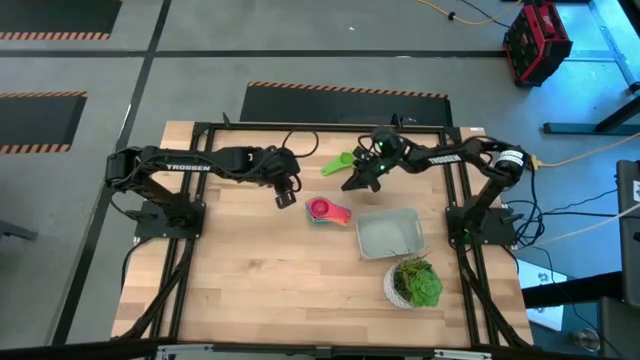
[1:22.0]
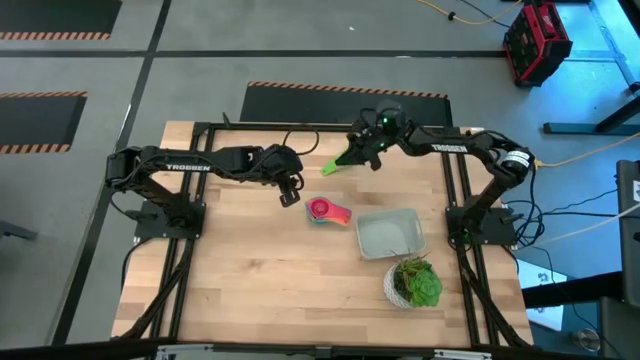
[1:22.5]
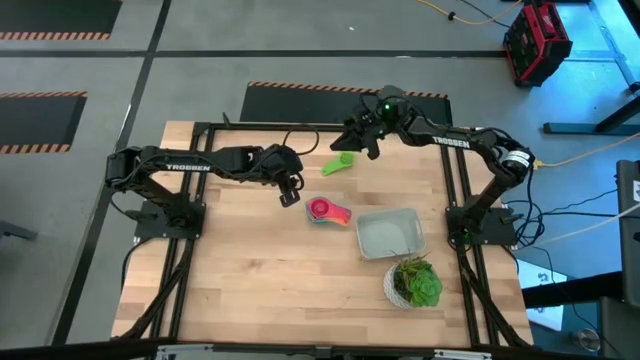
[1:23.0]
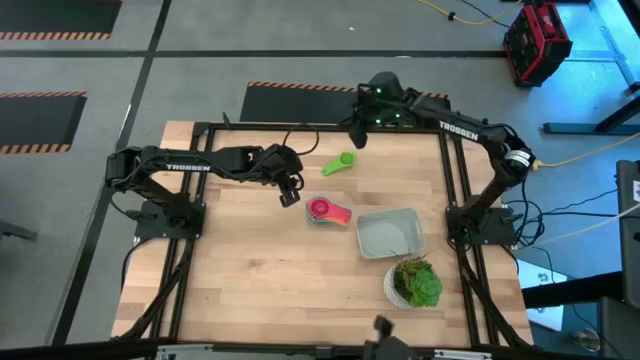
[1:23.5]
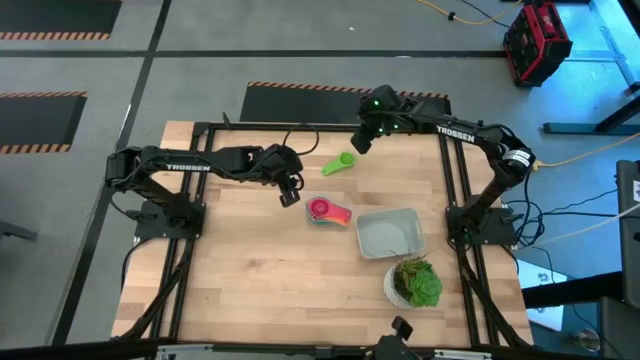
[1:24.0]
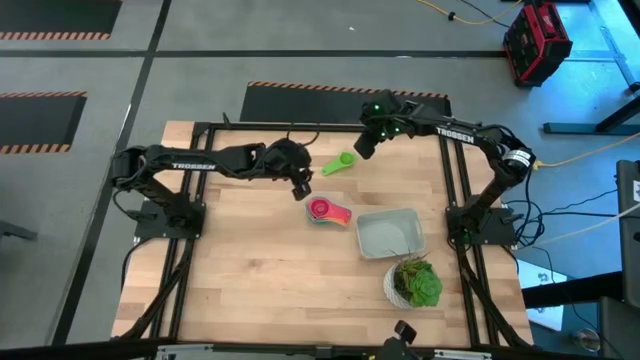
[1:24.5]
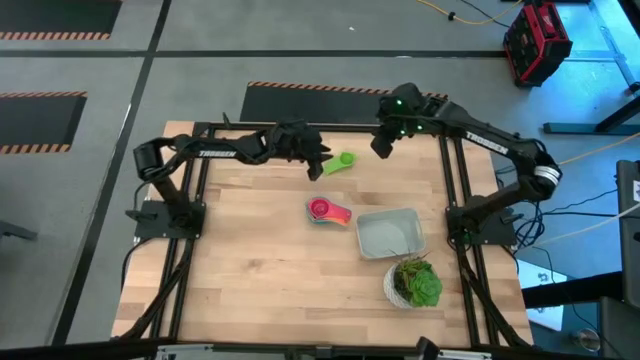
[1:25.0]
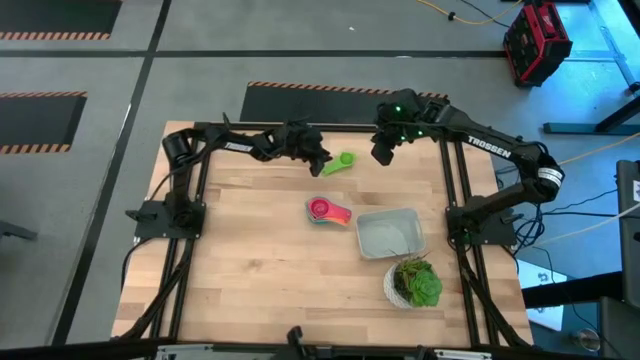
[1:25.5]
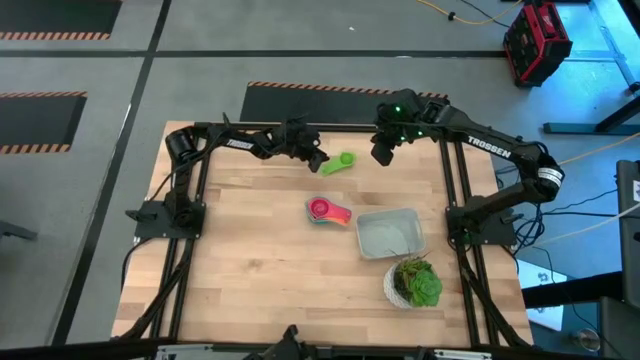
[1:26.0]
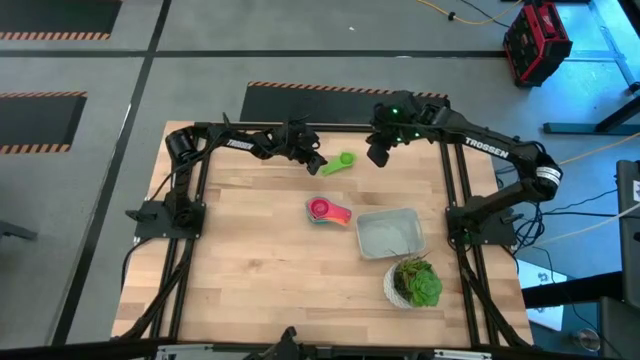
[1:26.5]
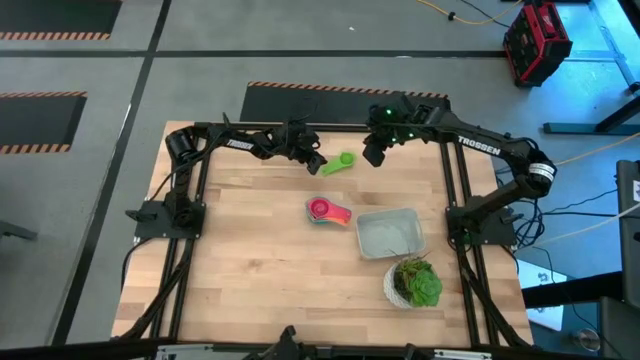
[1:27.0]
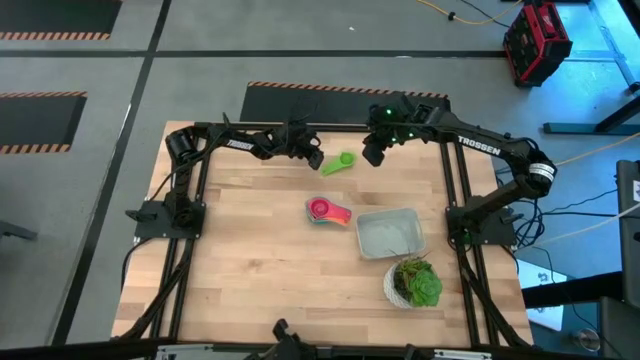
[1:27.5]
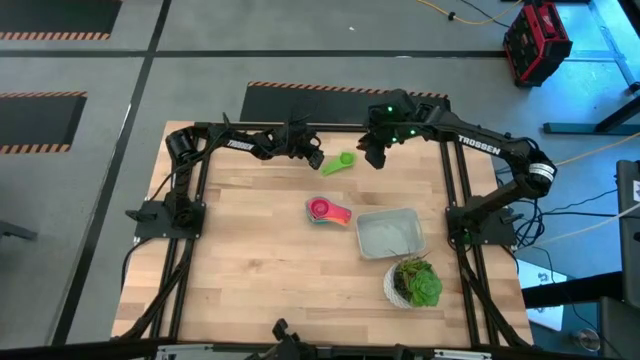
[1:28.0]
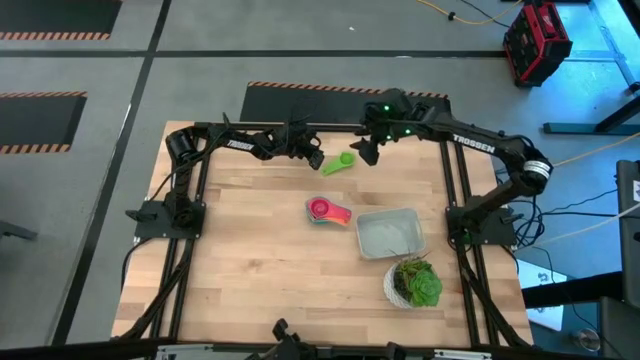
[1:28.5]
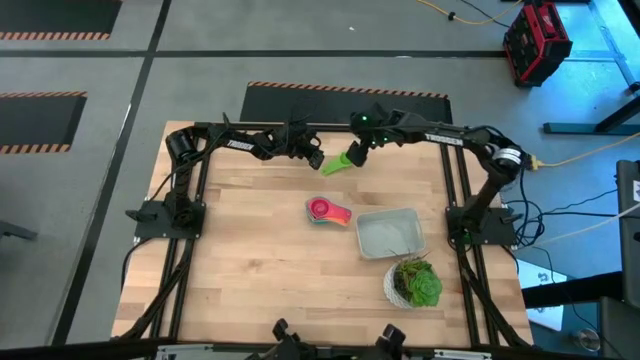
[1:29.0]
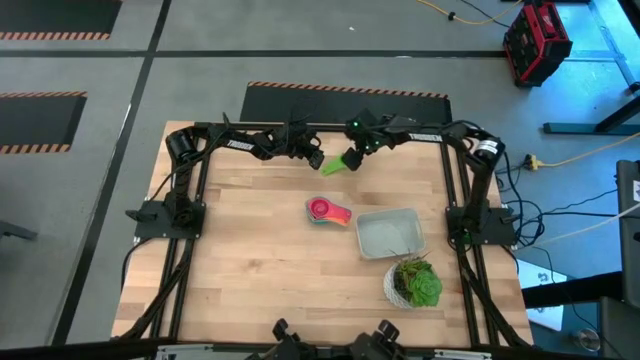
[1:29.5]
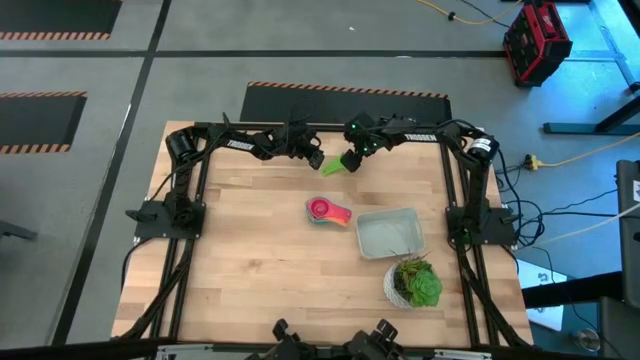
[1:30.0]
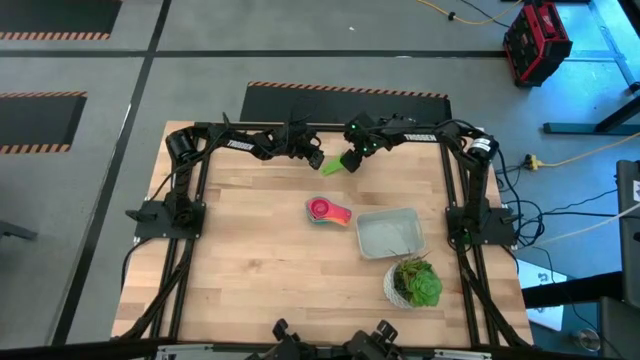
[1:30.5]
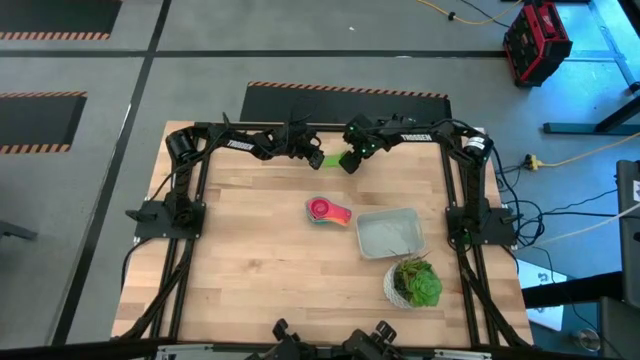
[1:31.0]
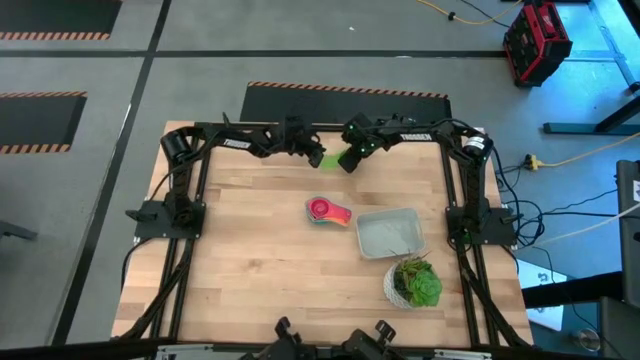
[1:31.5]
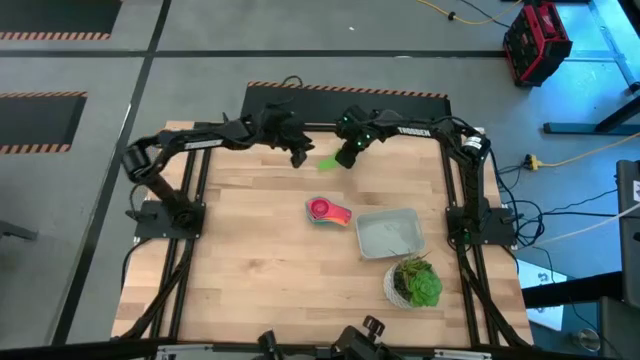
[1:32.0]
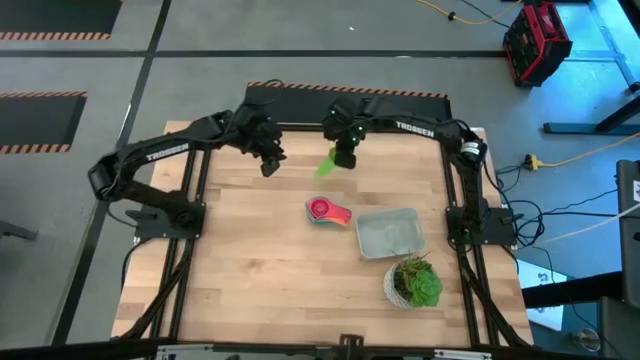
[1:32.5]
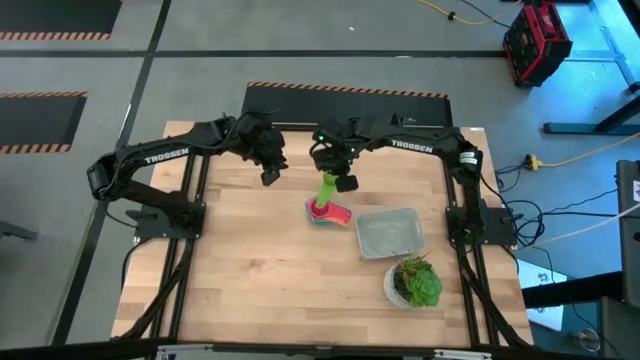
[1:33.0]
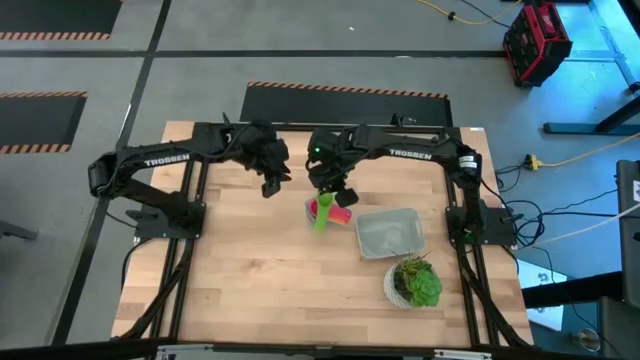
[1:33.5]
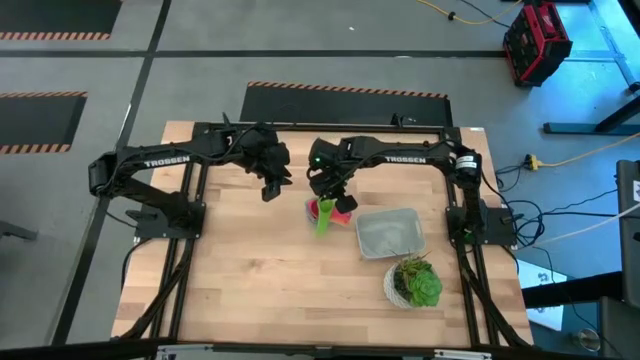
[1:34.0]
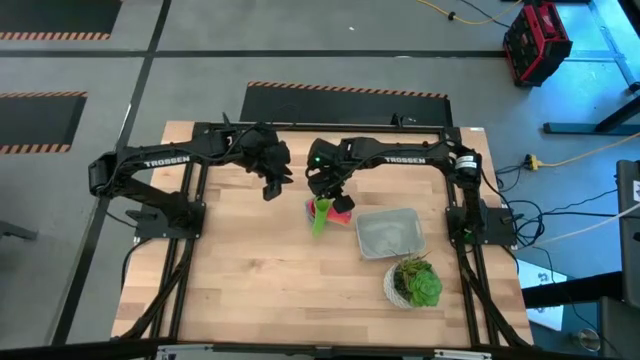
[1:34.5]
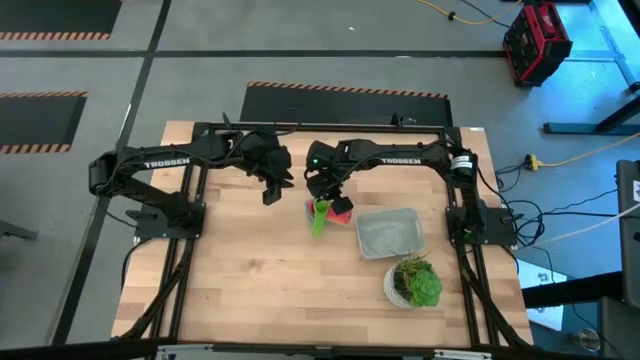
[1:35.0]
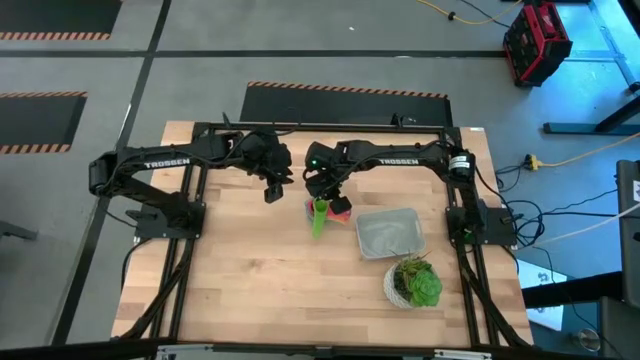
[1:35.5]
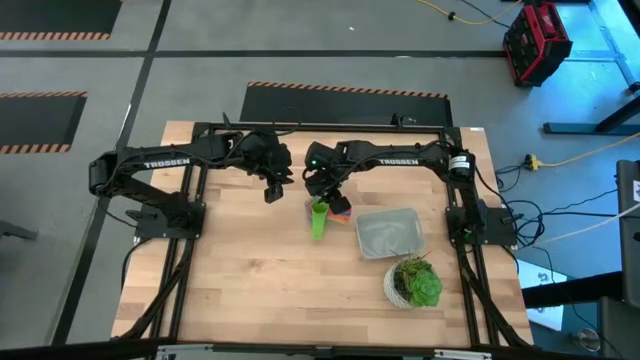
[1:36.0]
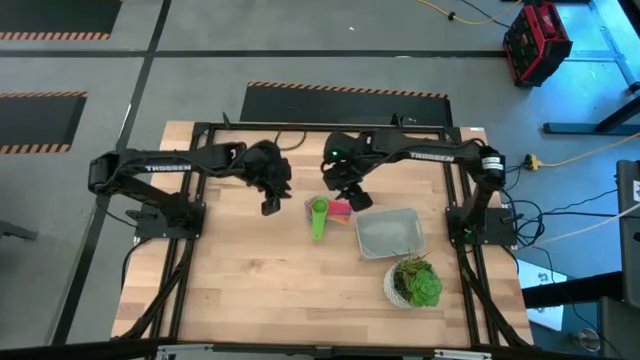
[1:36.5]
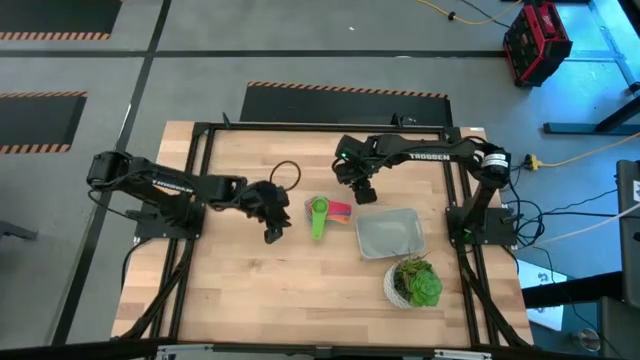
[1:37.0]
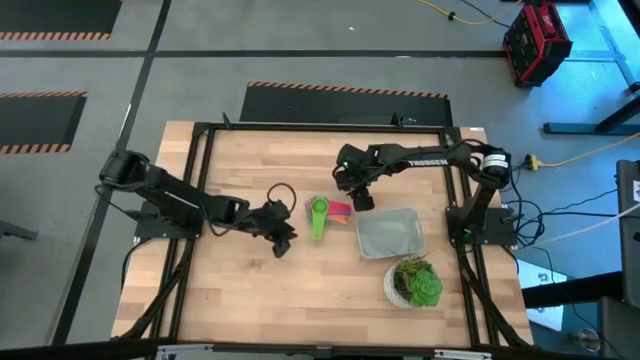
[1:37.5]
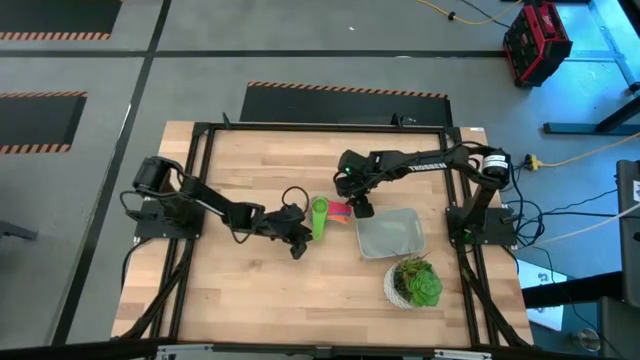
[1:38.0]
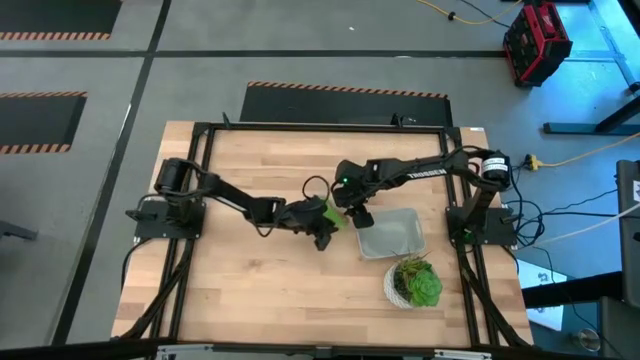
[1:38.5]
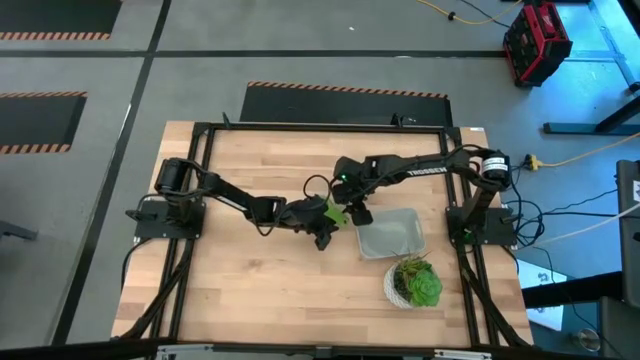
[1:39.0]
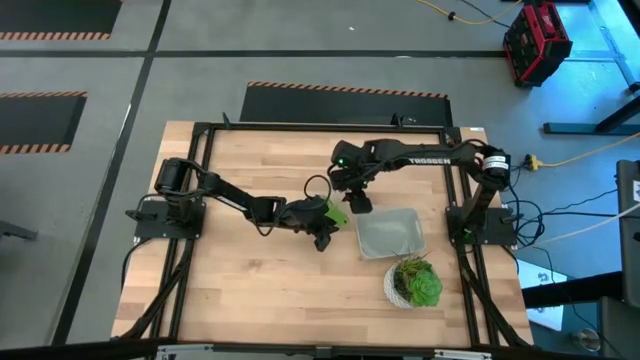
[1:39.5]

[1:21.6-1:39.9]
Task: Nest measuring cups in basket
Stack the green measuring cup on top of the pink measuring cup
